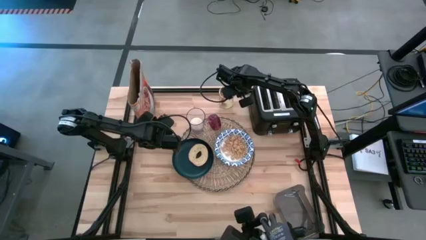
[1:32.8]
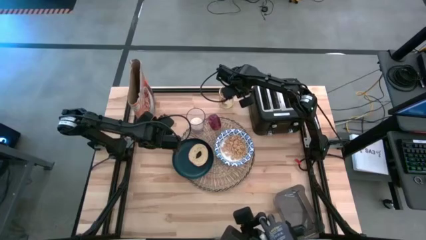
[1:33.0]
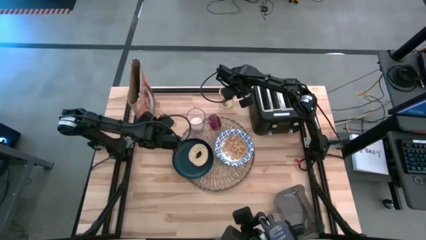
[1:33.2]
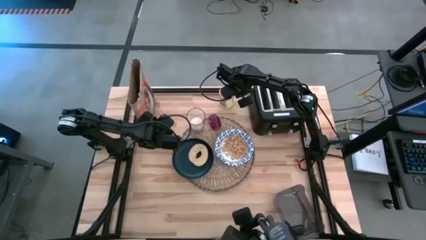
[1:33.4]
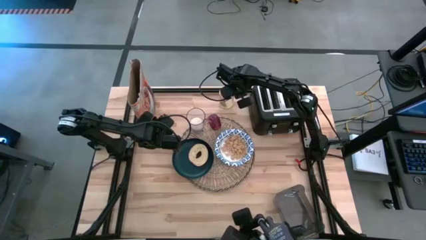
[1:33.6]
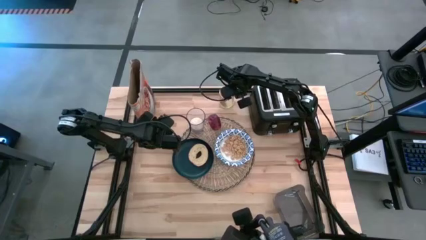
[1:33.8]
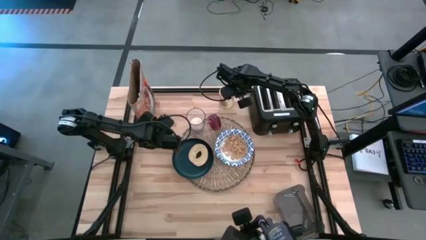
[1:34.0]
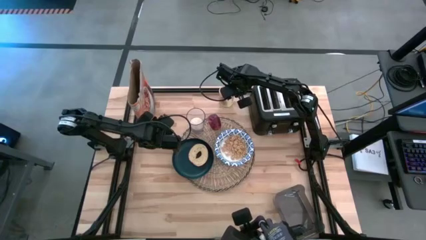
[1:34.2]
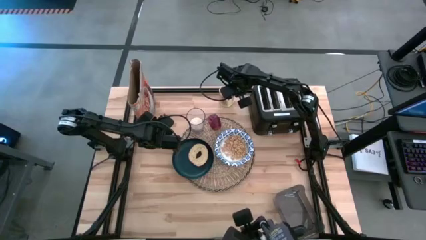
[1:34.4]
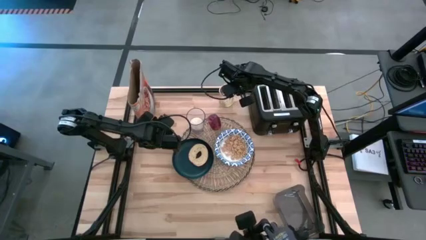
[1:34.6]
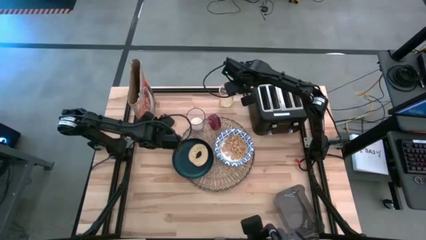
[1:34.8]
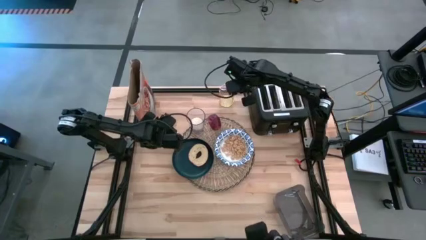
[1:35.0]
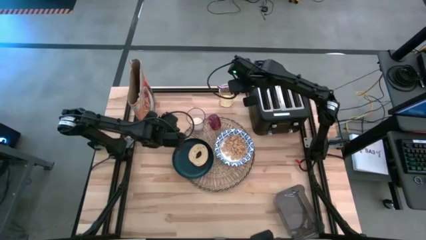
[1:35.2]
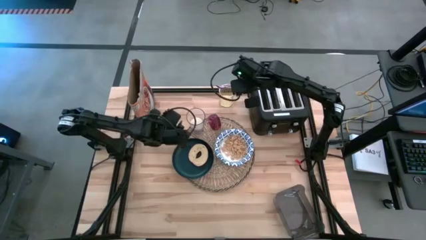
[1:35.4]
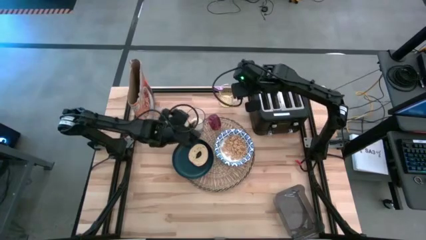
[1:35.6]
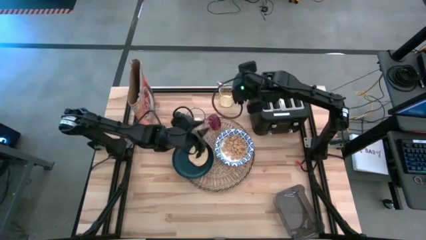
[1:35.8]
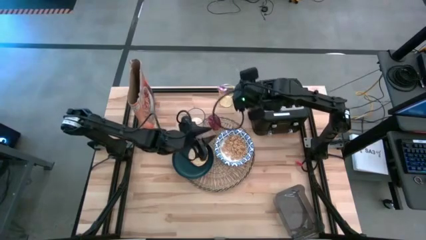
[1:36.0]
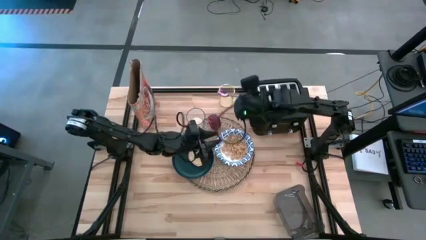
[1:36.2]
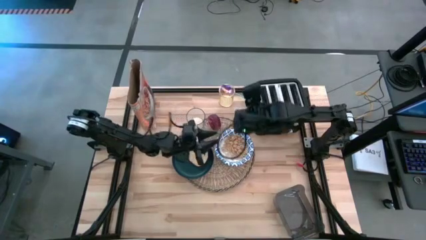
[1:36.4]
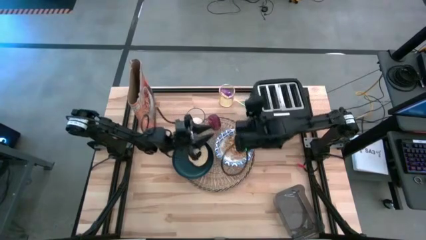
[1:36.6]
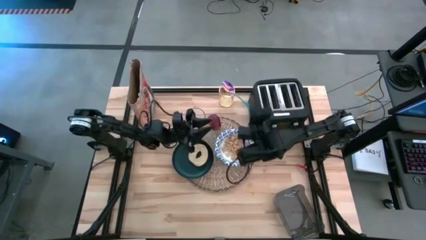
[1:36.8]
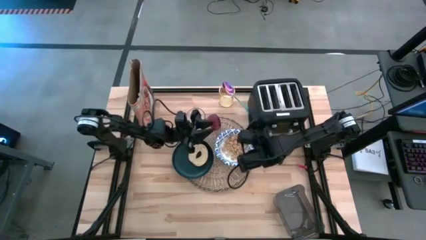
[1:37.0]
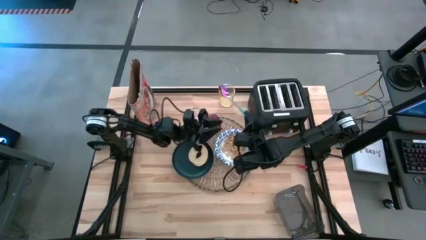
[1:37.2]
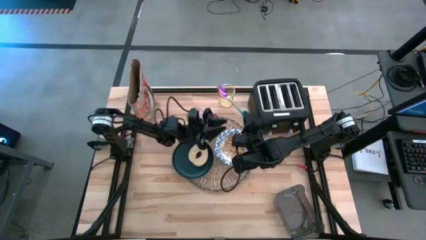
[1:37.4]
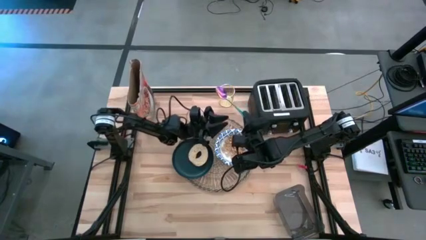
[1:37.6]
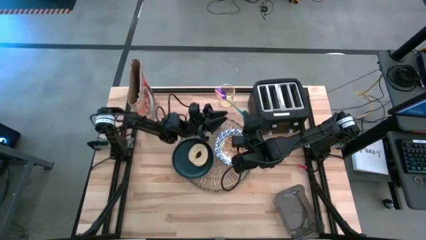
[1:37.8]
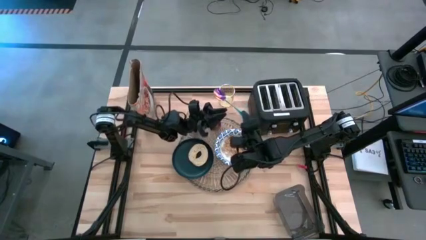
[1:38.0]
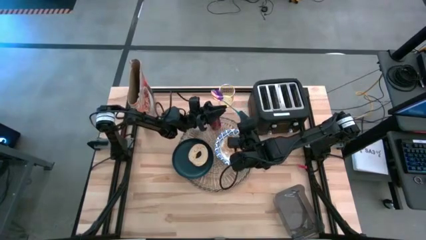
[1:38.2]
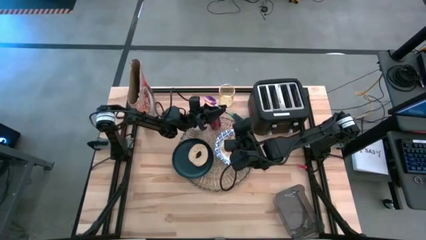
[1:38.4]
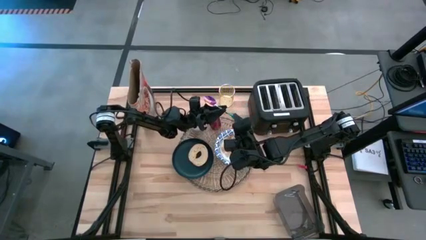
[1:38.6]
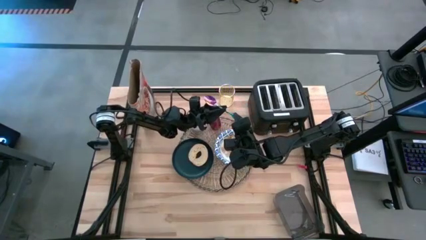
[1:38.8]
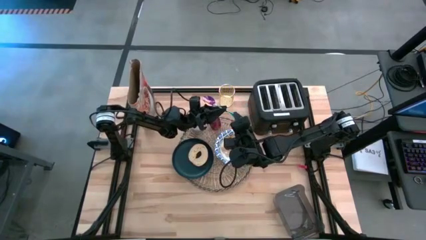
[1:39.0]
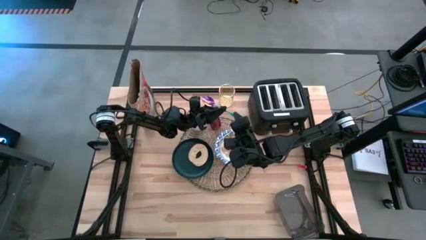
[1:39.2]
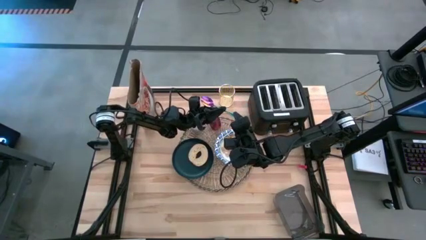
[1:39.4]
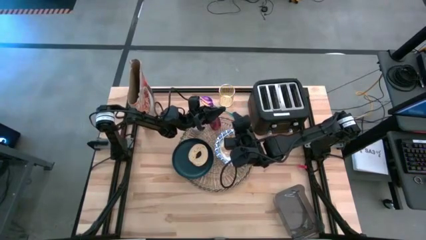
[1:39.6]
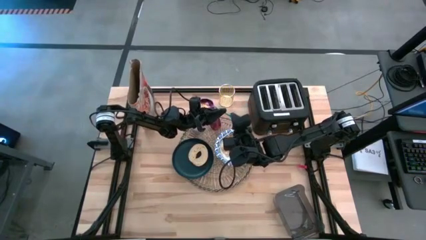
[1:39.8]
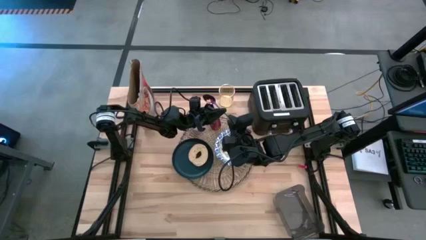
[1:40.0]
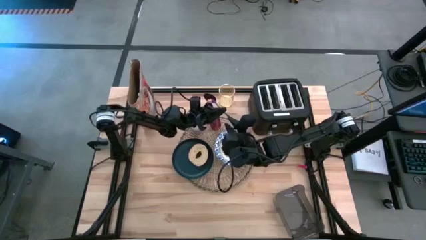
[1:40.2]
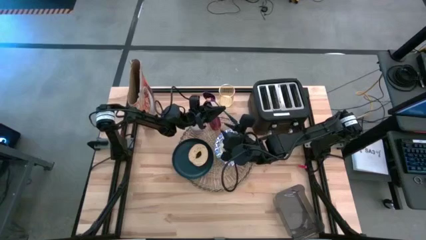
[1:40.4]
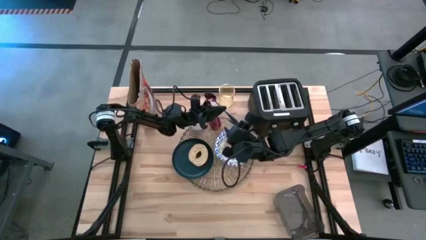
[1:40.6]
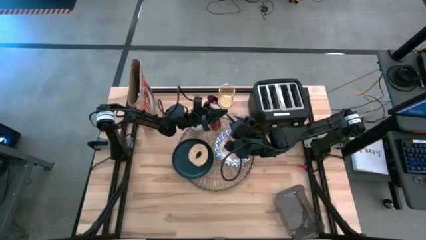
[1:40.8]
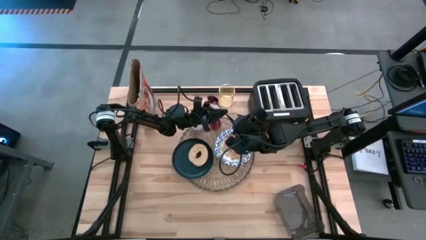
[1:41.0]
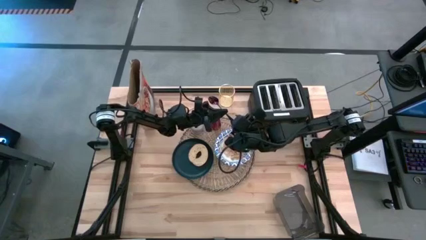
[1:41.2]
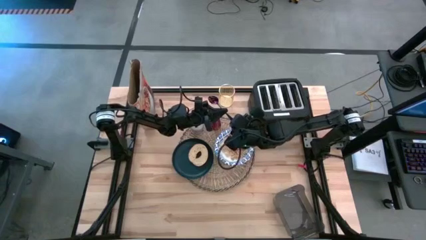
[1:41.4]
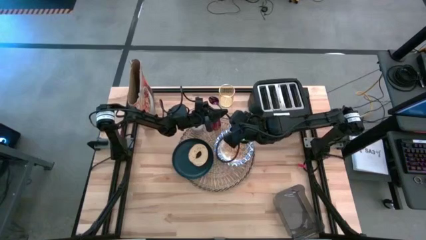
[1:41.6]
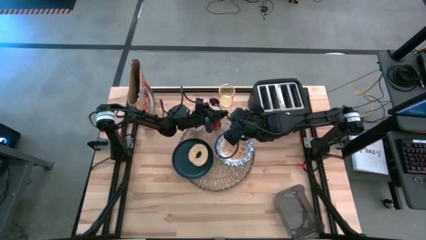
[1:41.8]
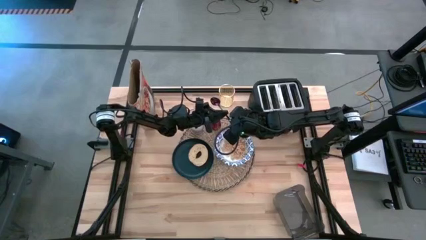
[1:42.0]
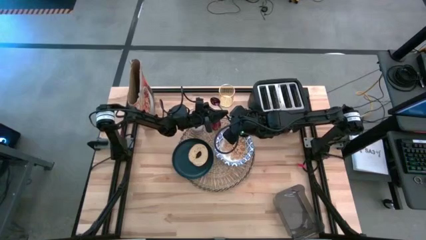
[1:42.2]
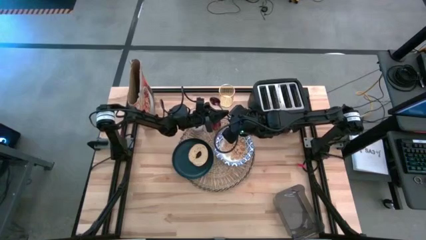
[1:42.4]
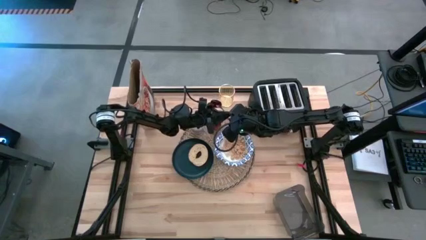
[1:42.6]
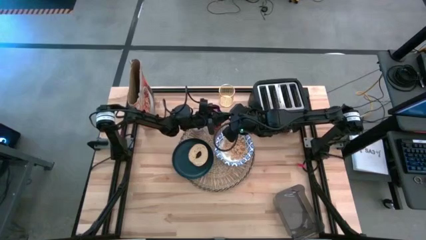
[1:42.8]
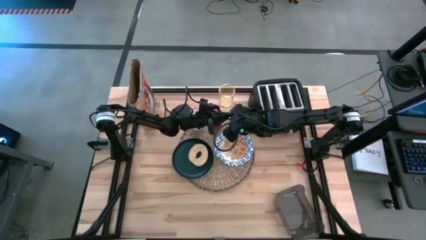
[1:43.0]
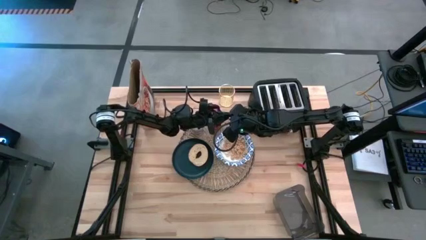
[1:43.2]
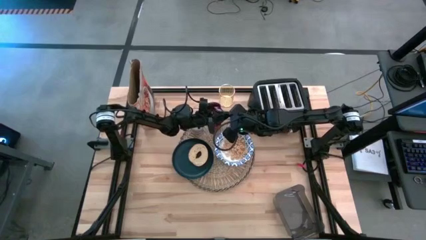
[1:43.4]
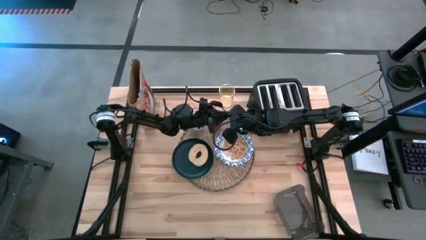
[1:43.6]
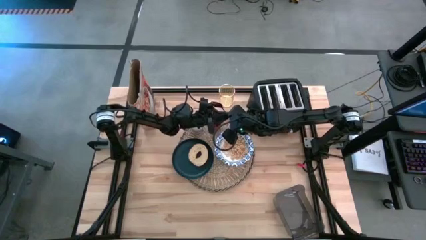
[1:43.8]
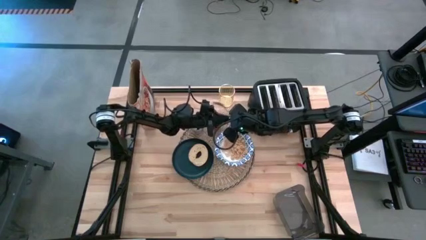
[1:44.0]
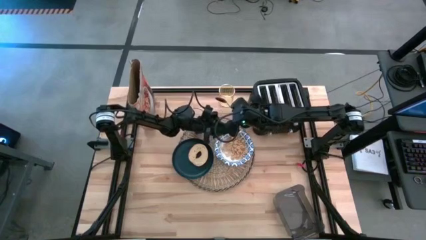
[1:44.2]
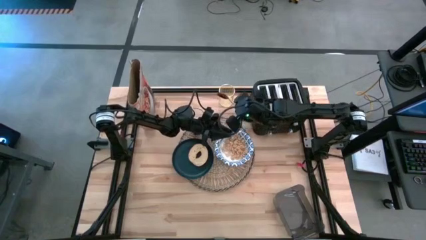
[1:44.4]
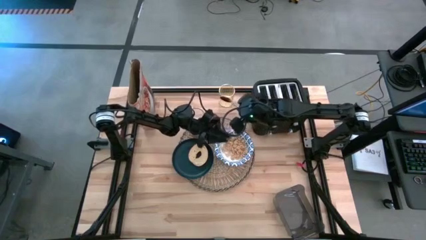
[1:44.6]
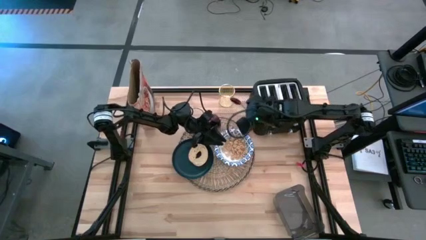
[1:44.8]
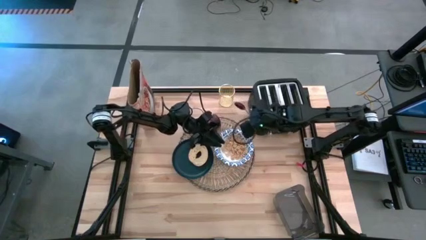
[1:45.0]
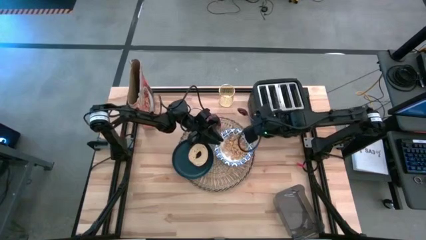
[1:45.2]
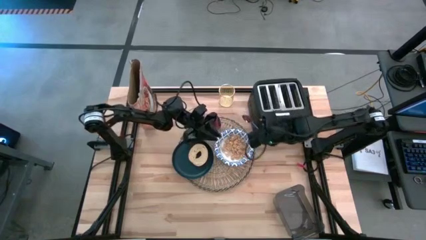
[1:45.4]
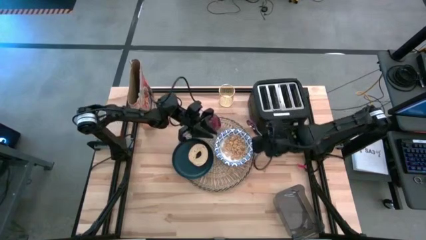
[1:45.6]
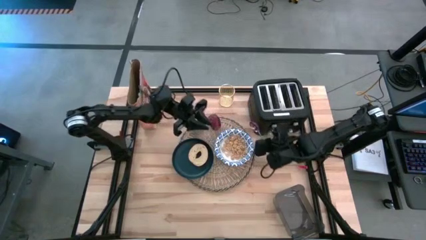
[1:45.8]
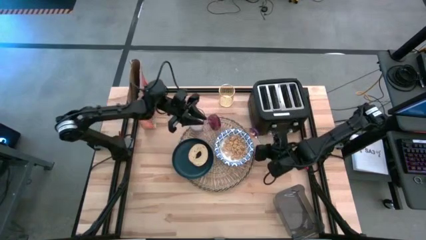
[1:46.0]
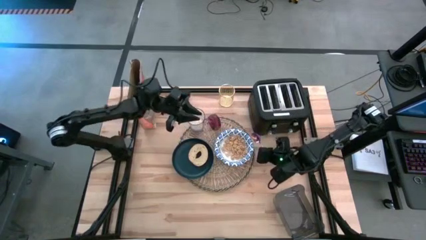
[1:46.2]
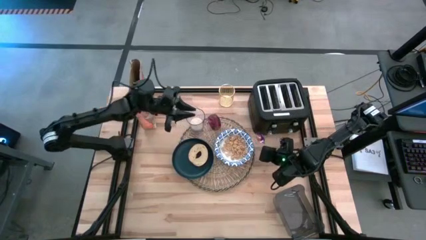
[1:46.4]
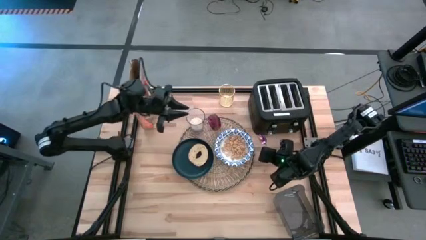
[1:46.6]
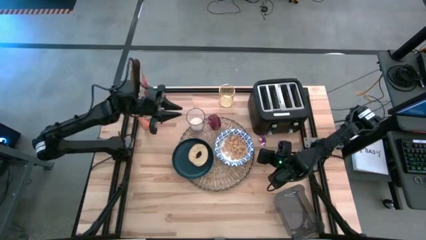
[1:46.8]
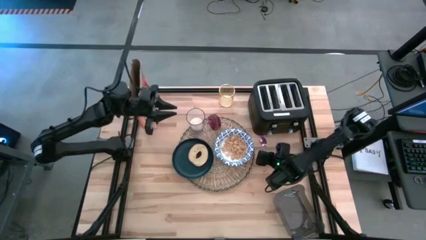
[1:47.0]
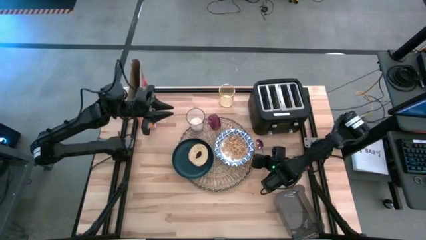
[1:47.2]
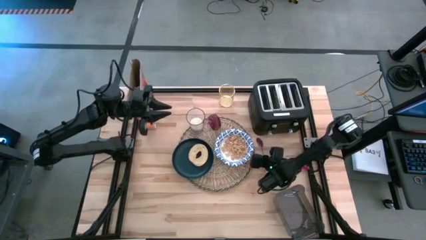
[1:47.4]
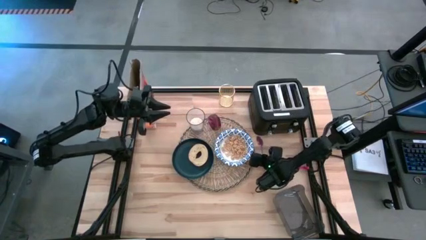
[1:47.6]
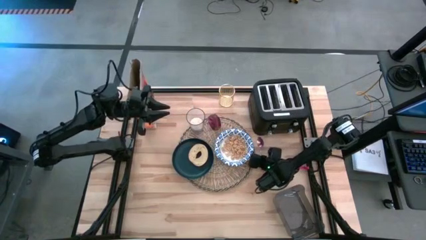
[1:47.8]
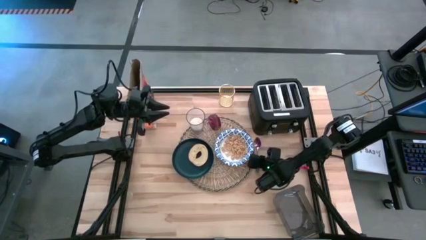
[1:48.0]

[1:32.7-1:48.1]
Task: Arrange a breakfast setting
Put the blue spoon from the yellow cup to the right of the brown placemat
